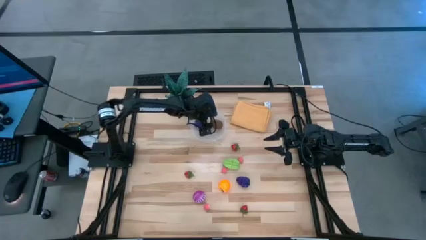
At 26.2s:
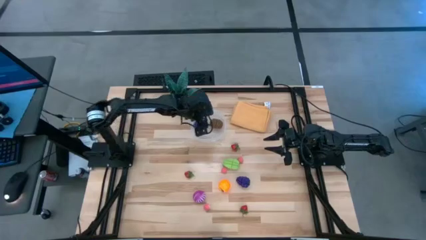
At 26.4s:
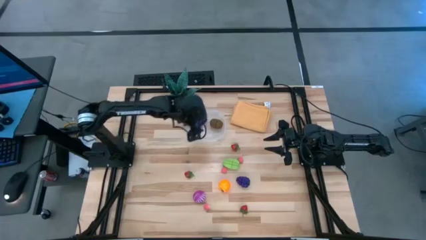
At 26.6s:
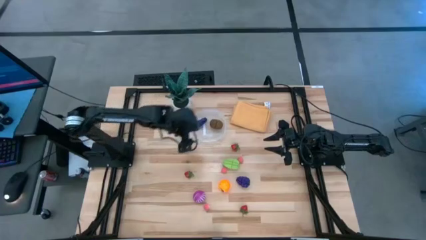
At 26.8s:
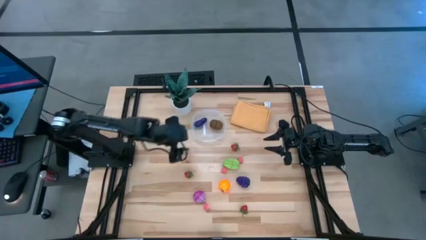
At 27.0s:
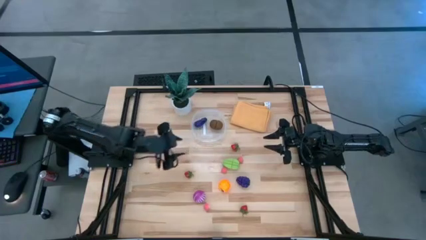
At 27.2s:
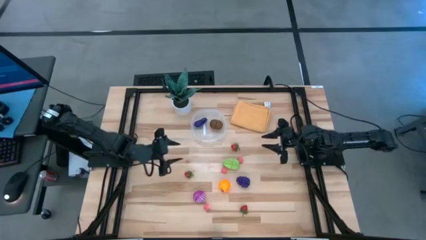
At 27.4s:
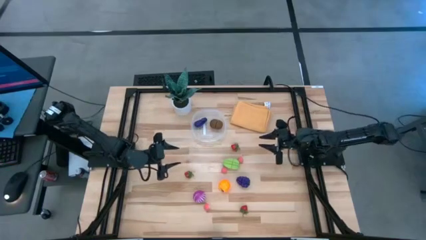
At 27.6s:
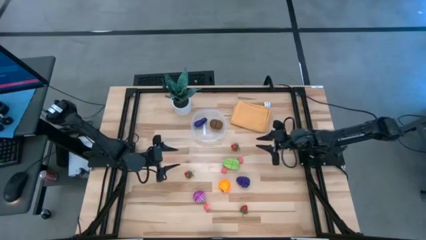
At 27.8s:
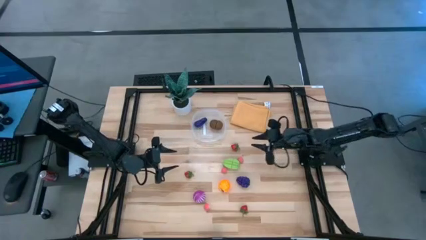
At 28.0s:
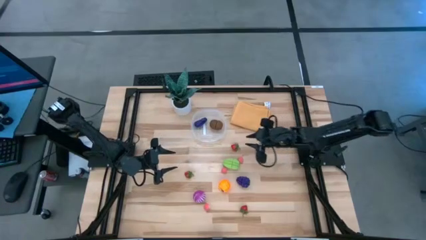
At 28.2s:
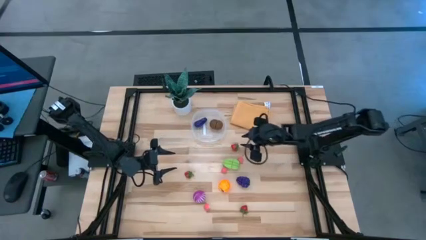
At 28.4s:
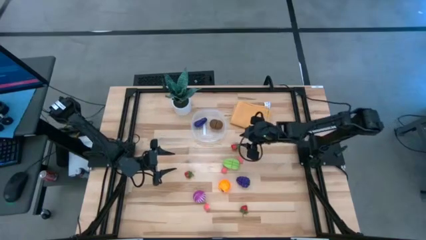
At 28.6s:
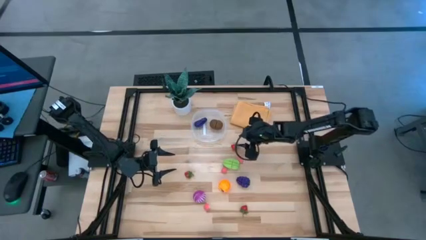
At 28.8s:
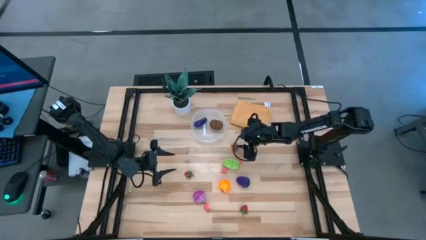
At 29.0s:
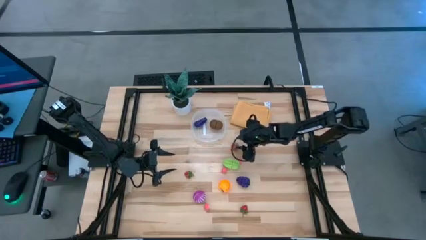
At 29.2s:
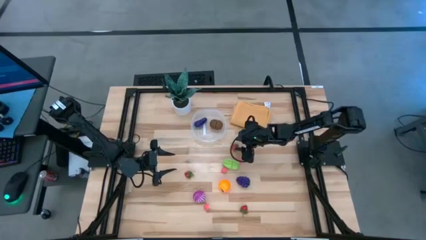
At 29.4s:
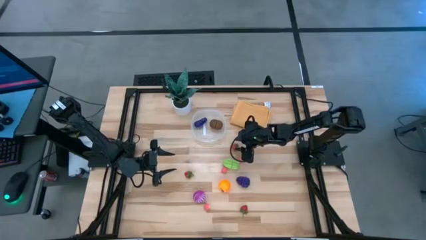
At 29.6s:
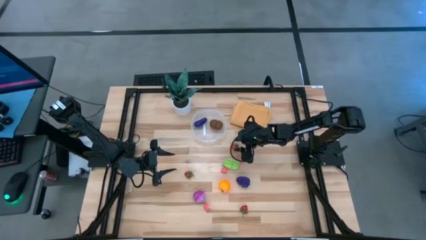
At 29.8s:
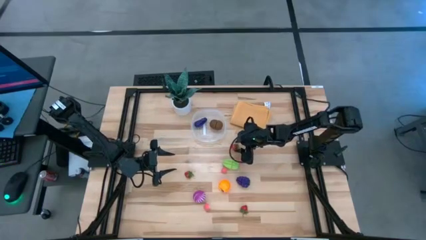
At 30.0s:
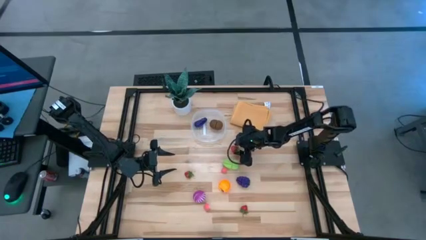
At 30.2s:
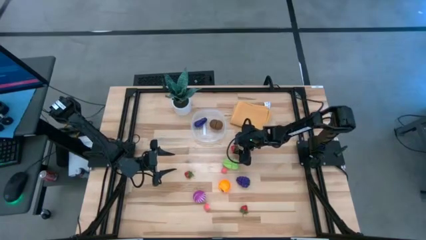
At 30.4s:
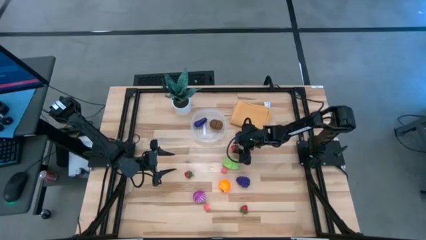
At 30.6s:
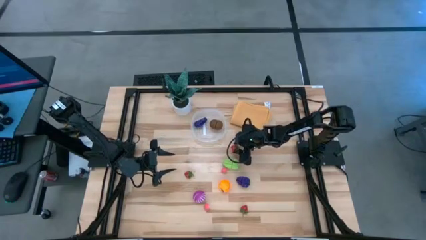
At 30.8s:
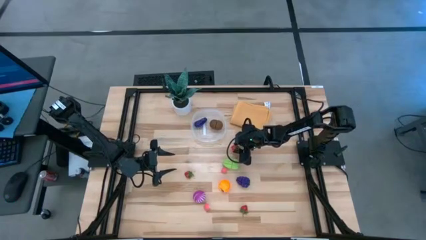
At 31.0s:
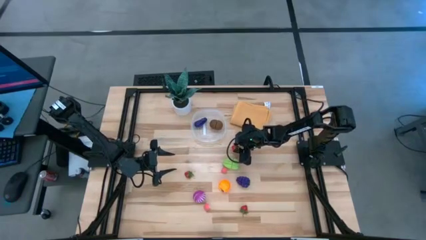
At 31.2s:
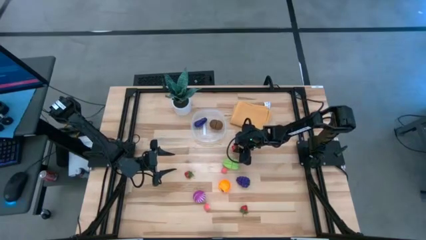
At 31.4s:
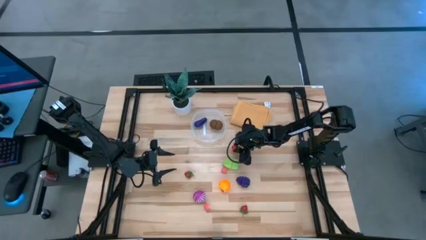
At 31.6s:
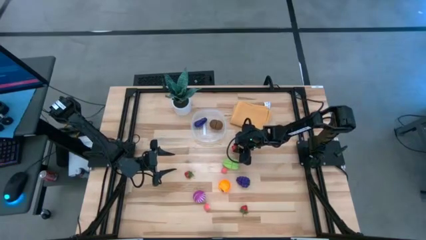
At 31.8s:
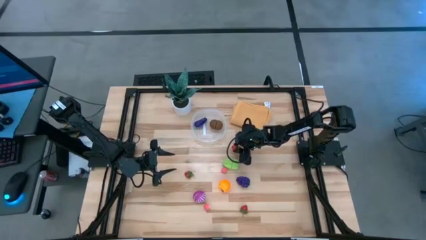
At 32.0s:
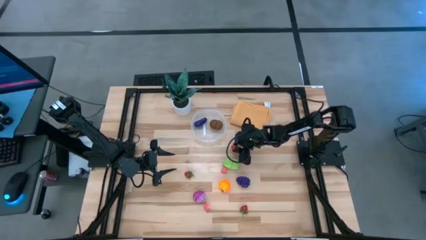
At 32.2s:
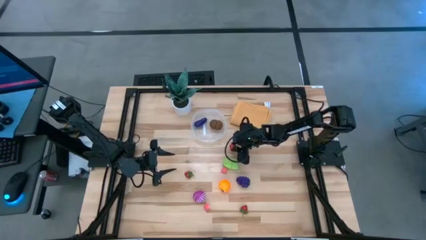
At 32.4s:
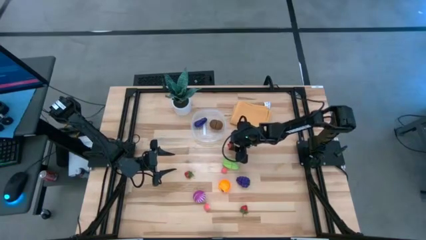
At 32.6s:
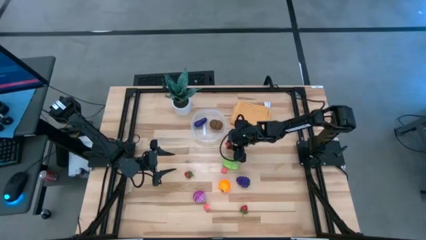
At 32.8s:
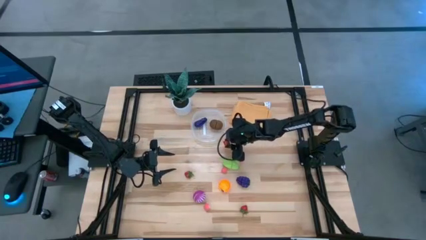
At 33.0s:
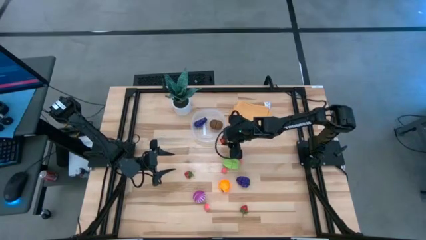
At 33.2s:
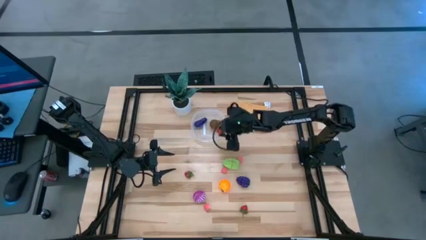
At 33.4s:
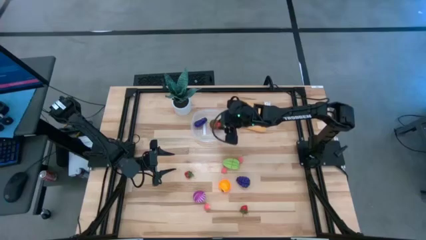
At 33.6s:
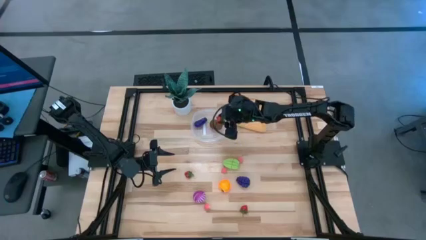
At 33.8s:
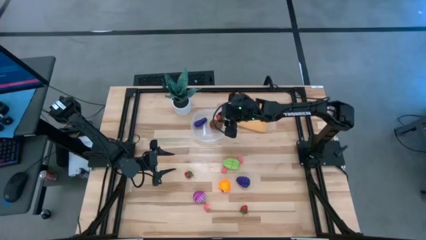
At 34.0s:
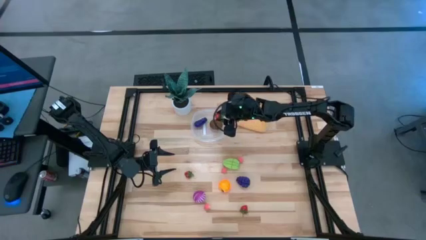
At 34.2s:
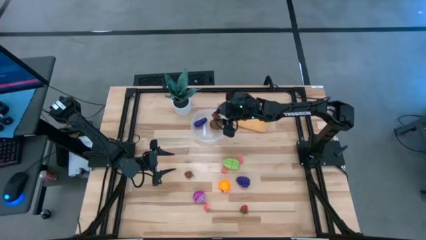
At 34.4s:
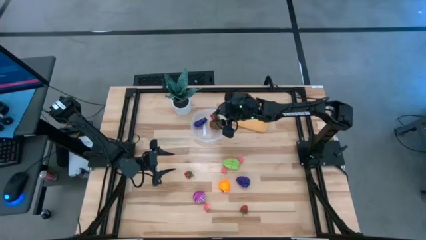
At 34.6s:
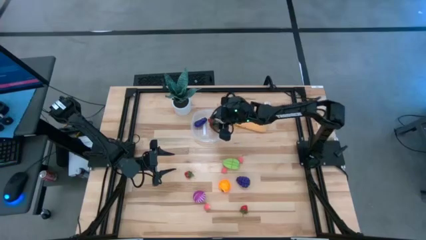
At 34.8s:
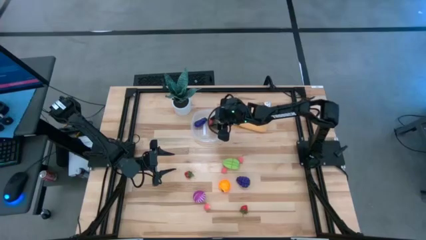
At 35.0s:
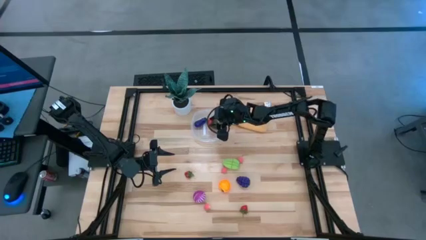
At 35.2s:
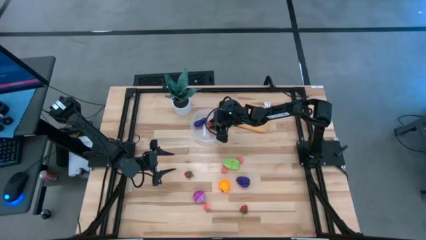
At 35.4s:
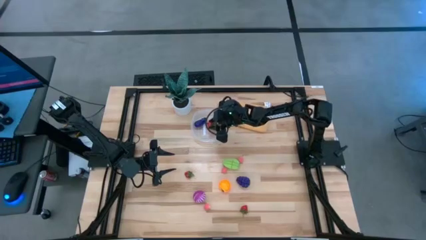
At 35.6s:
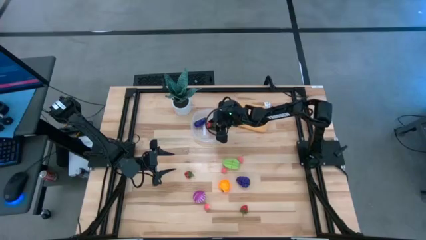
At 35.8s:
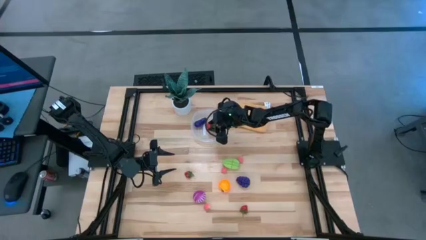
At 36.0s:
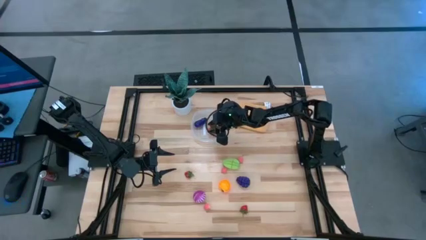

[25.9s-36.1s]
Task: Pick and placing Produce into tupperware
Put the top right red strawberry into the transparent bin
